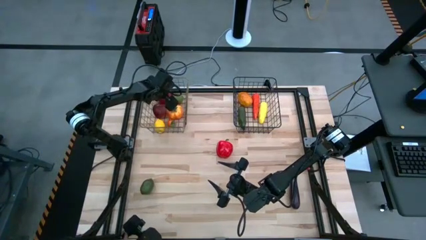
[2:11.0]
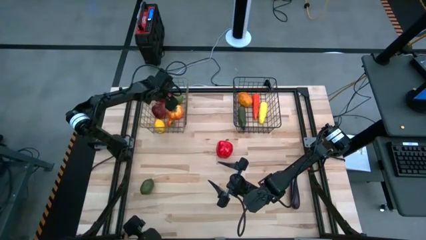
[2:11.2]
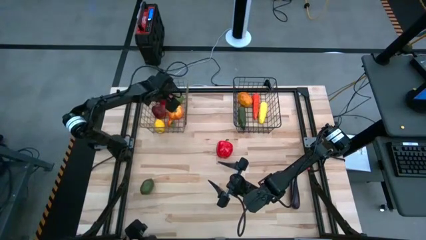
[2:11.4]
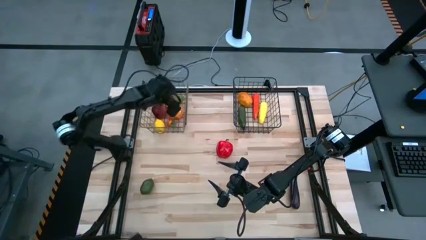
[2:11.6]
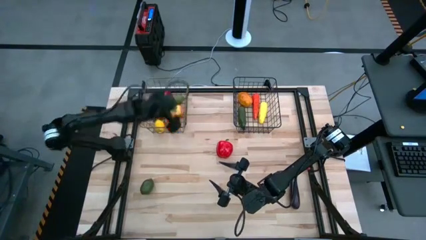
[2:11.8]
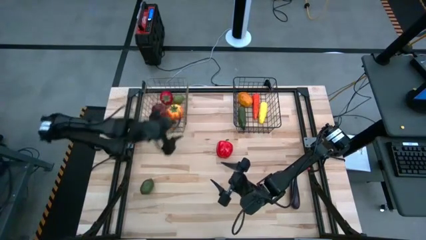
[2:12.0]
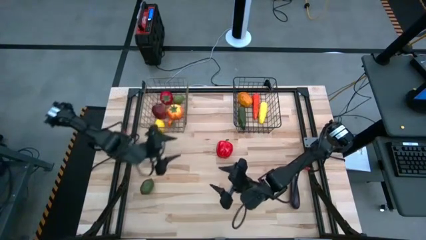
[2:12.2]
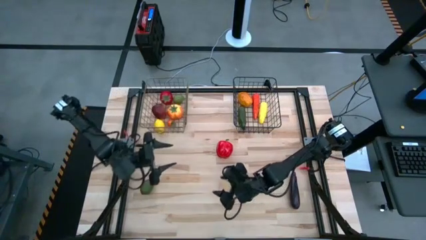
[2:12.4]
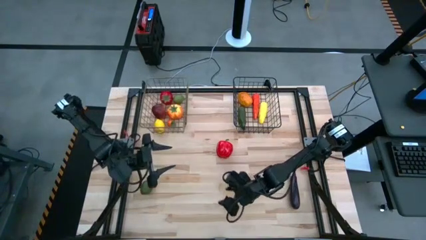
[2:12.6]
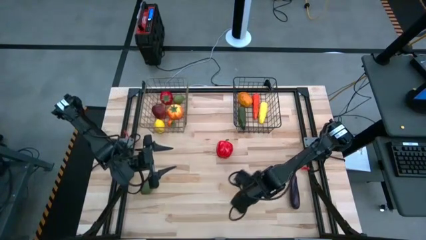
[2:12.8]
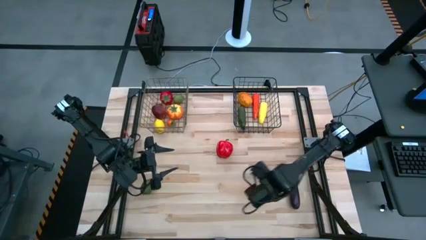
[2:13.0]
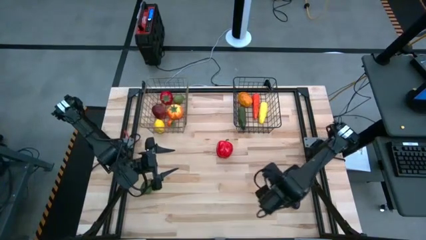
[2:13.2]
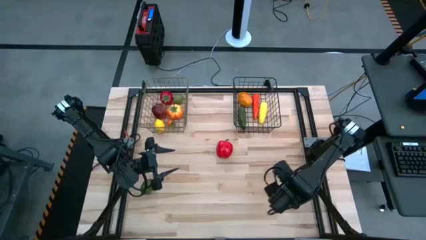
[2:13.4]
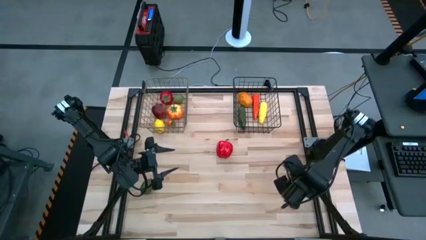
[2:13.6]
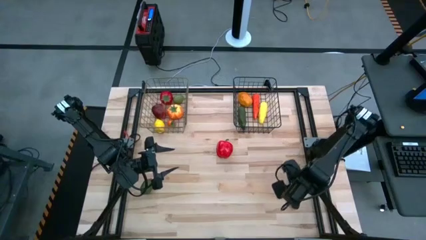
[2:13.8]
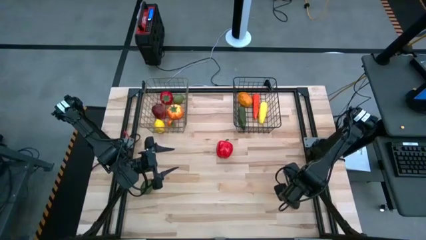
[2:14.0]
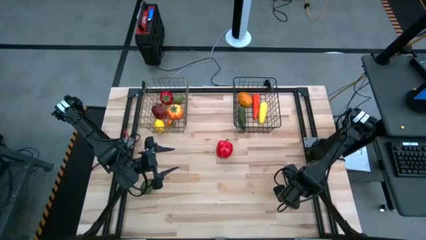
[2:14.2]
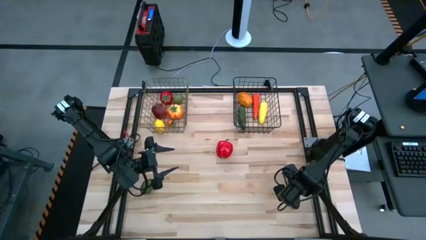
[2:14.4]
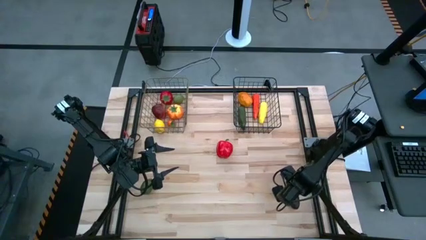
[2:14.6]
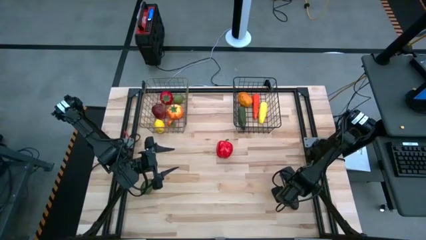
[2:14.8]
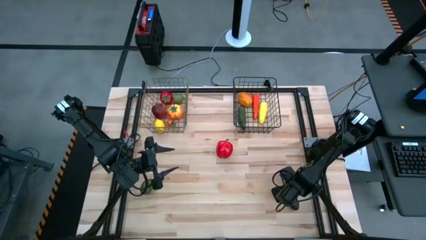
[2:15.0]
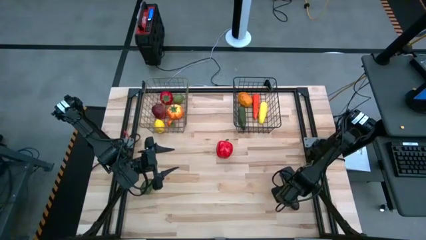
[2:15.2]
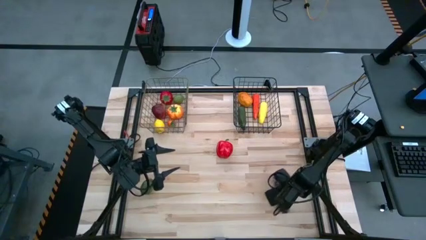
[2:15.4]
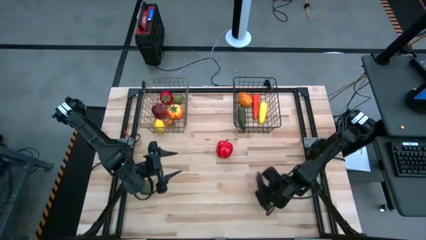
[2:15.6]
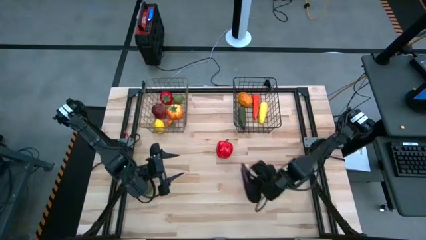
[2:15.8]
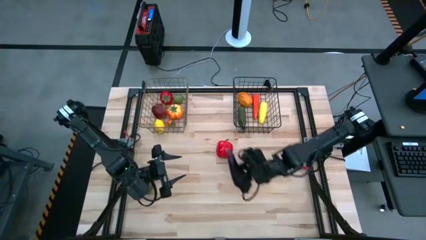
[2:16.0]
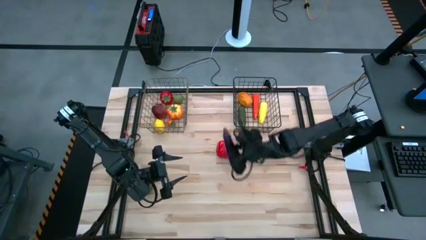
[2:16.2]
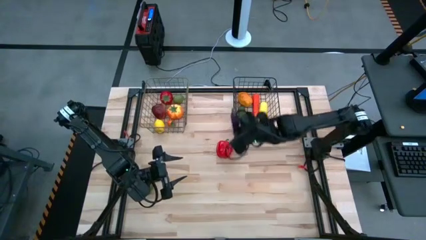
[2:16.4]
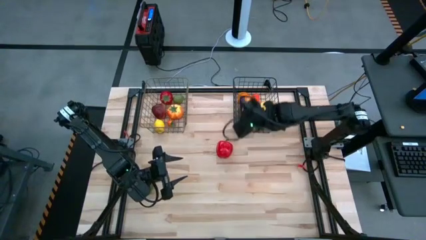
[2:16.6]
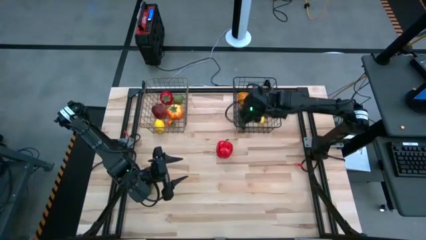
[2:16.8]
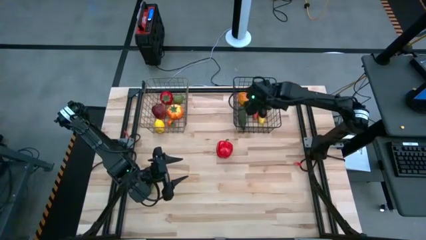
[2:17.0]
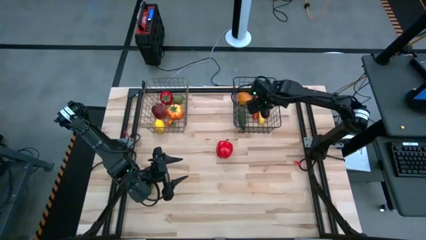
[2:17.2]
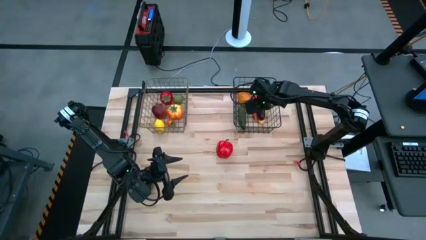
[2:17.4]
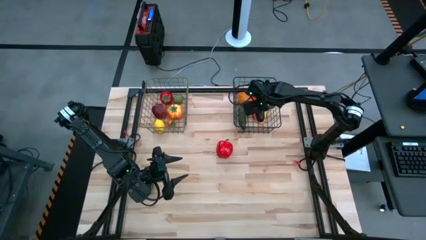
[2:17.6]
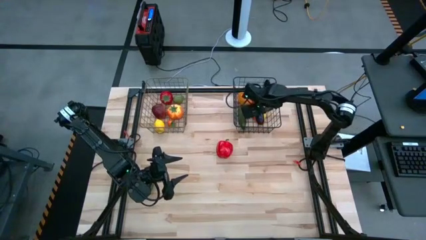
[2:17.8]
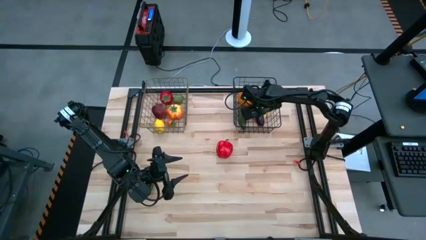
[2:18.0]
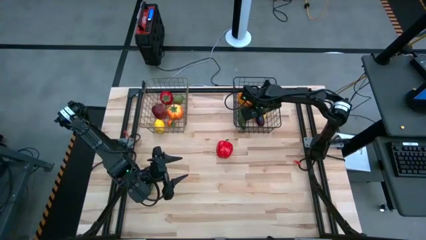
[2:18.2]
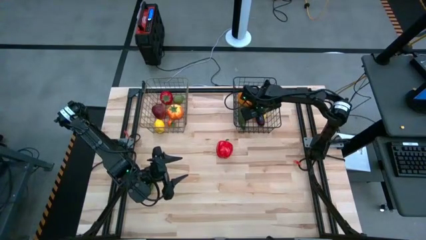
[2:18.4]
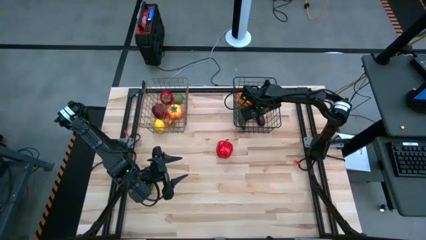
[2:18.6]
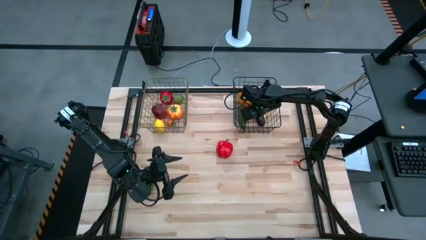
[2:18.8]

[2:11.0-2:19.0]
Task: Sort produce into baskets
Put the purple eggplant into the right black wire basket

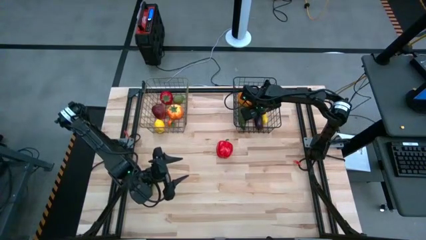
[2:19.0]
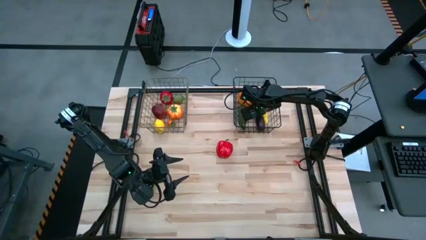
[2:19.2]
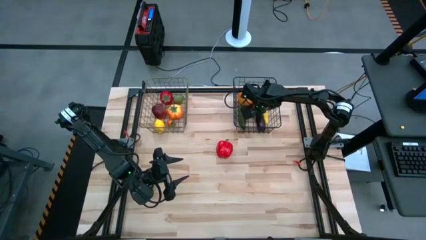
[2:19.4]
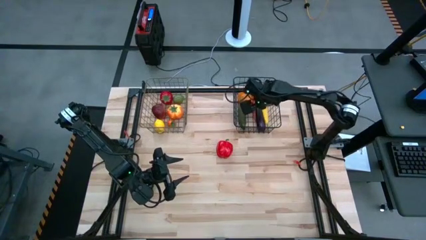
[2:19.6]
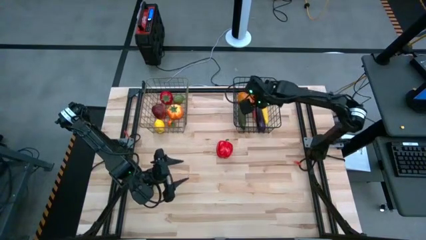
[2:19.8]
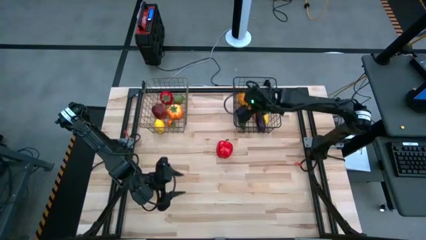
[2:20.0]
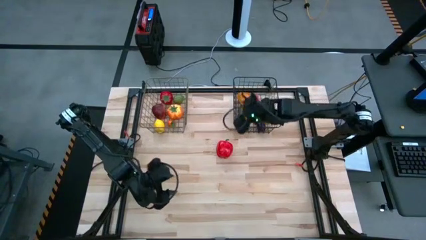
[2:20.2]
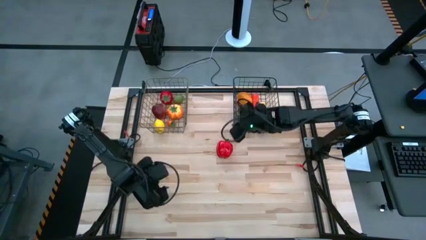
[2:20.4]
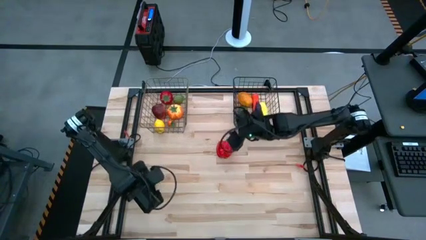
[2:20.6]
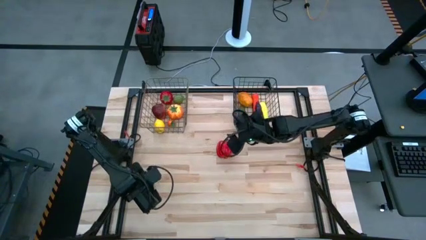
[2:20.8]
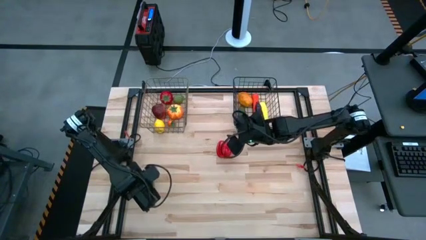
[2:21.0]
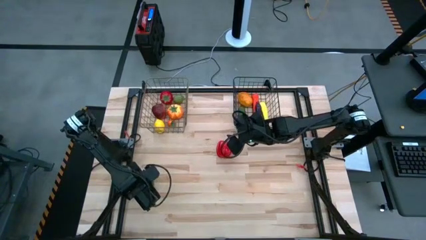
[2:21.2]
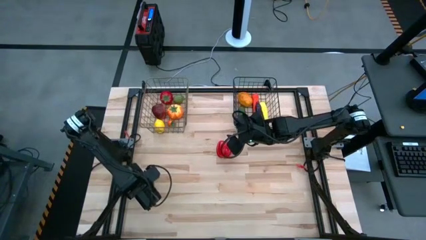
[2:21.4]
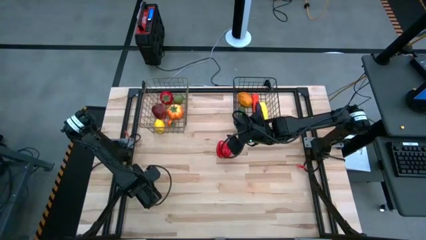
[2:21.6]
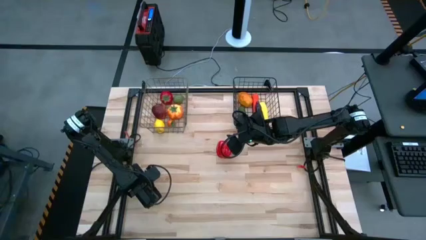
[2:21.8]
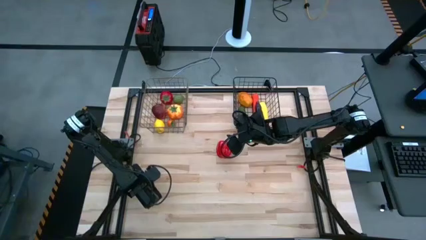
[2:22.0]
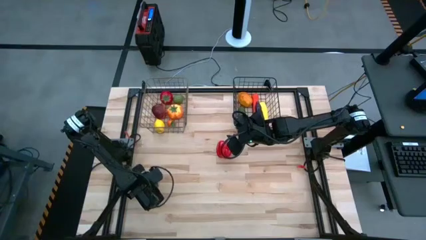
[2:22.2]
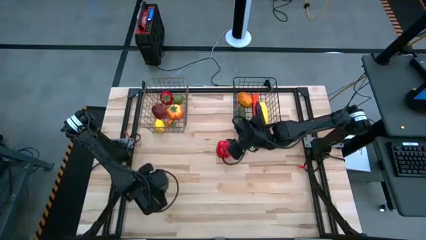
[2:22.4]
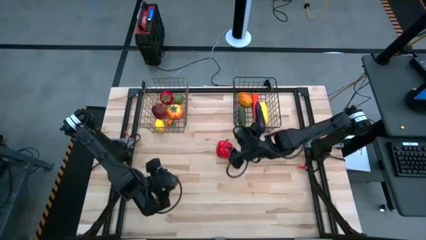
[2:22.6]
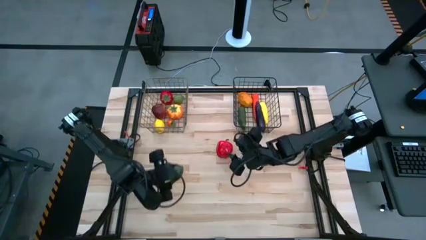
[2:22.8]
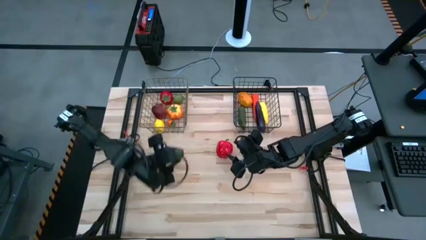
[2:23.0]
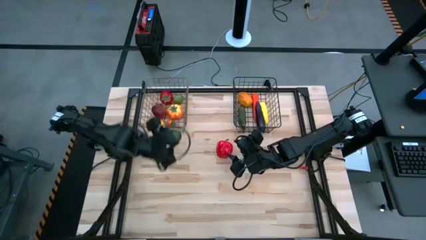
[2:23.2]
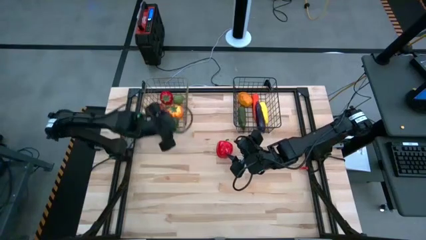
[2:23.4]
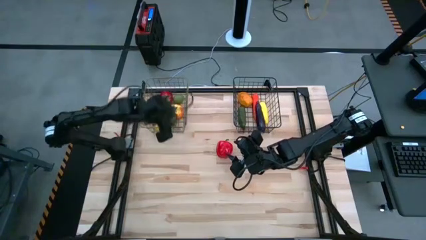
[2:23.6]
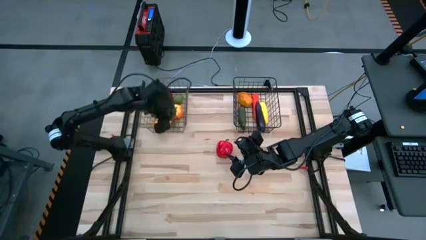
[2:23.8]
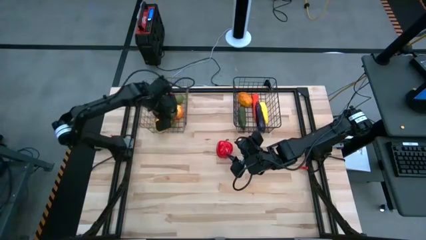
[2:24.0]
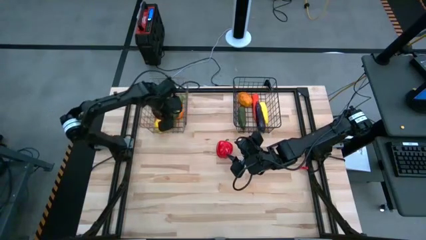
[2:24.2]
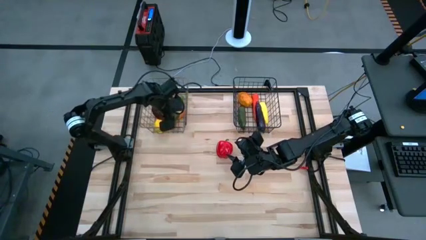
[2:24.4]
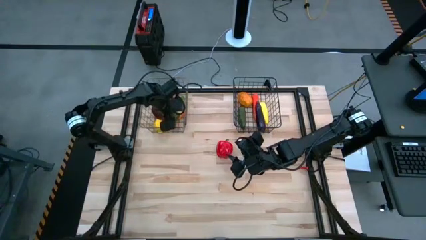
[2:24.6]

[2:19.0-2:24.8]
Put the green lime into the left yellow wire basket

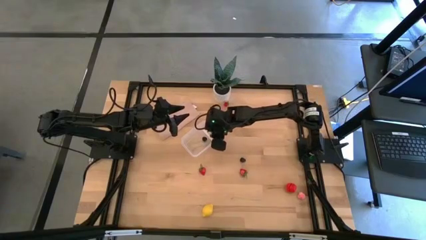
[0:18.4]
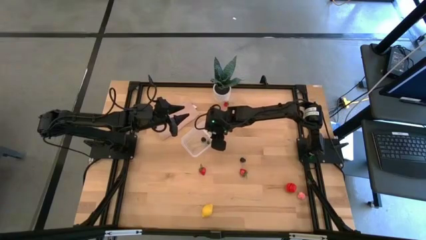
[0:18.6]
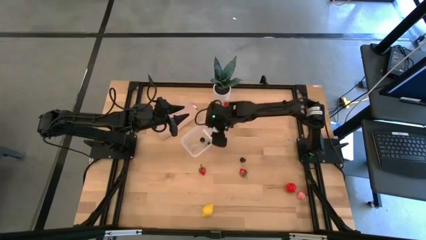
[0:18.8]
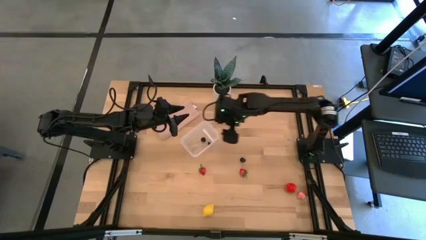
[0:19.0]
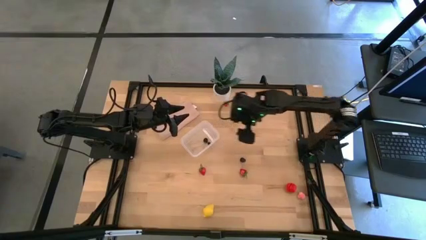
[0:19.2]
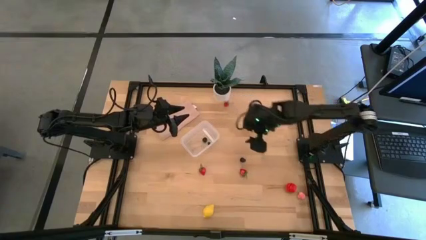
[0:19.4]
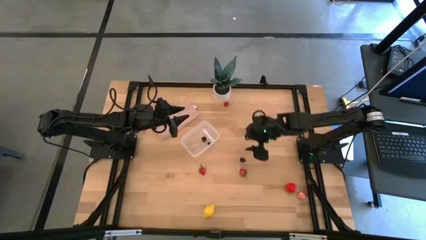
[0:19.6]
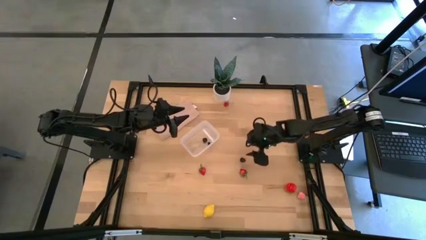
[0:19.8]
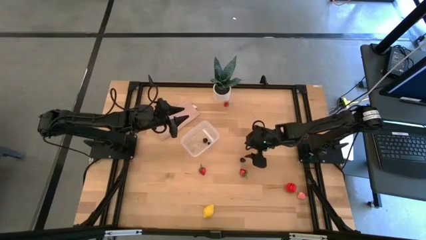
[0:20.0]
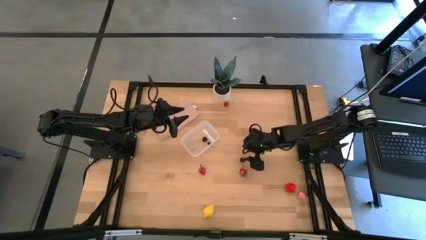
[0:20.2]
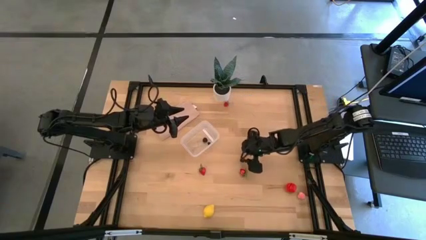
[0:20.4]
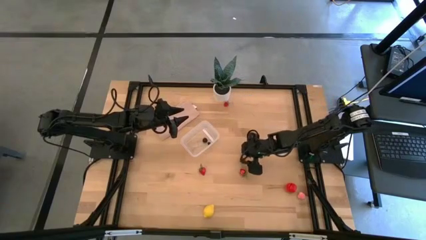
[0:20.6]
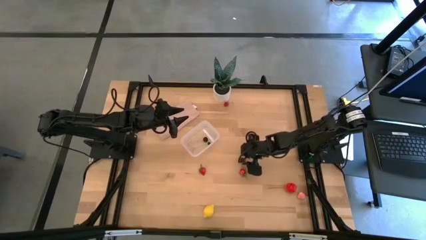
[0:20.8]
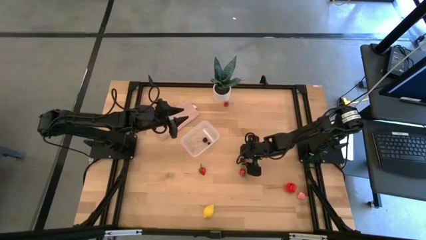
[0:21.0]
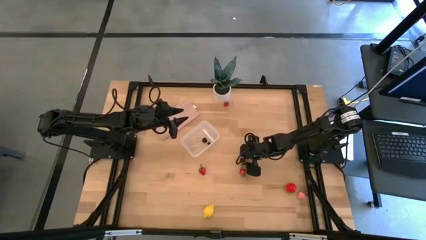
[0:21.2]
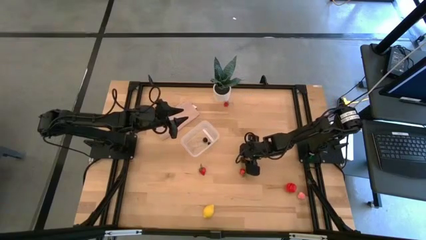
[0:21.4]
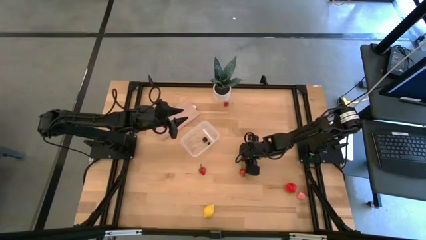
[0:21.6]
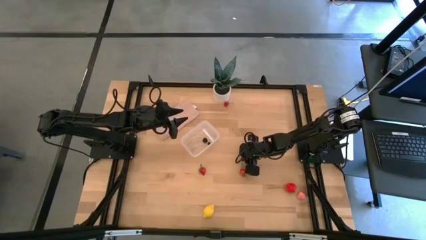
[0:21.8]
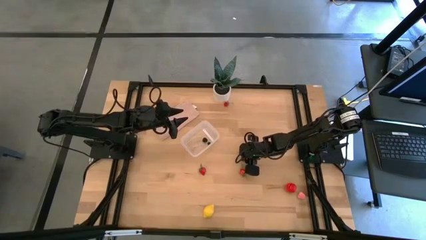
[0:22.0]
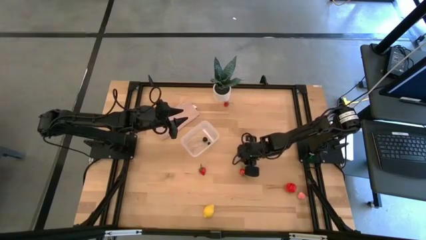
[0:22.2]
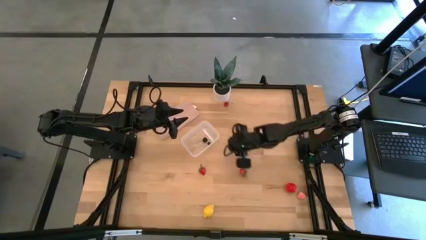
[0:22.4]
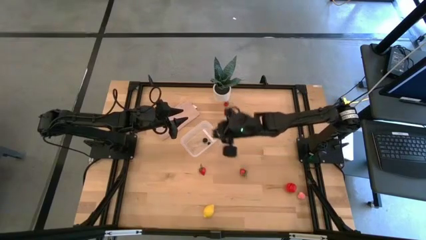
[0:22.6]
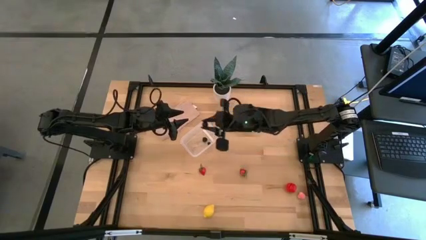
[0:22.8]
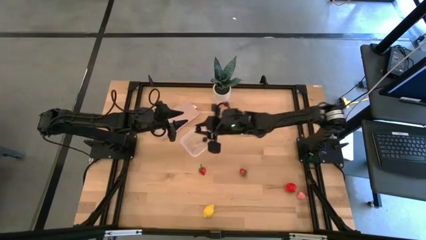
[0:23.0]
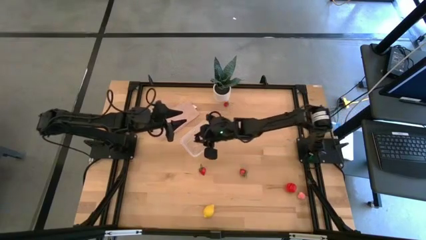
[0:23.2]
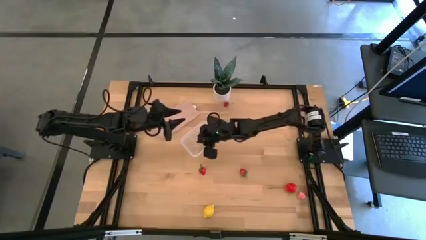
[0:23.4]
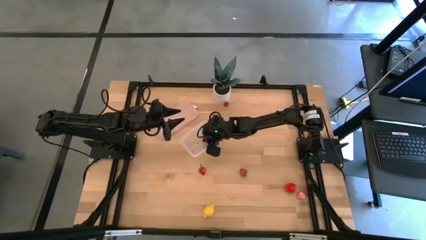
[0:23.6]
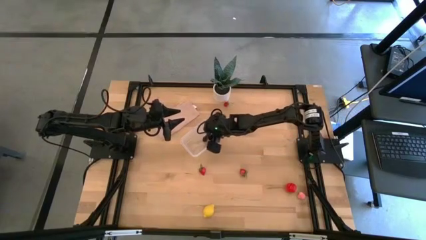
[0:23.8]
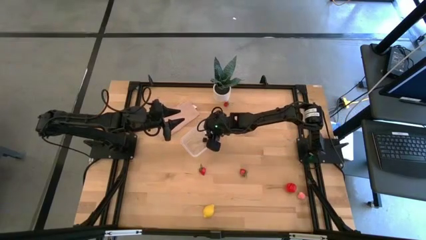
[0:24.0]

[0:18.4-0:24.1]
Task: Pick and placing Produce into tupperware
Put the black mulberry into the transparent bin
